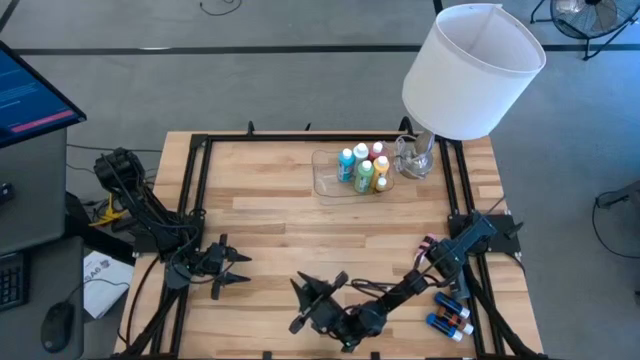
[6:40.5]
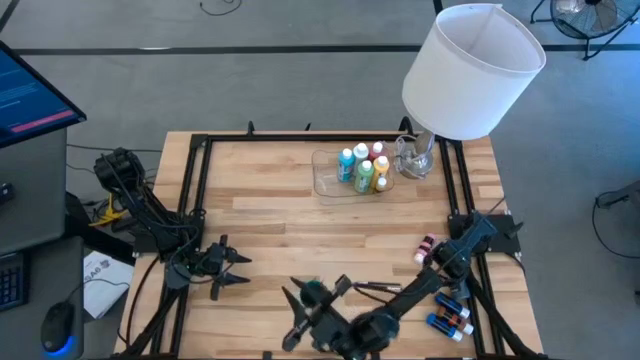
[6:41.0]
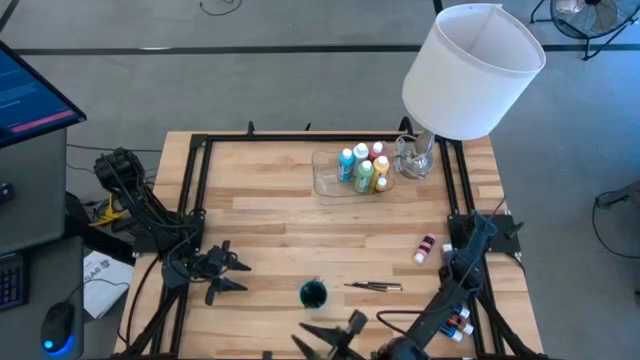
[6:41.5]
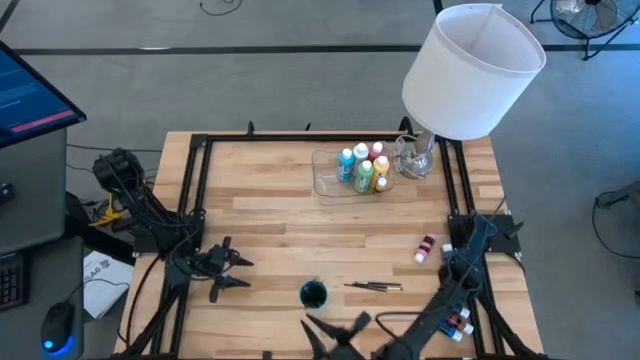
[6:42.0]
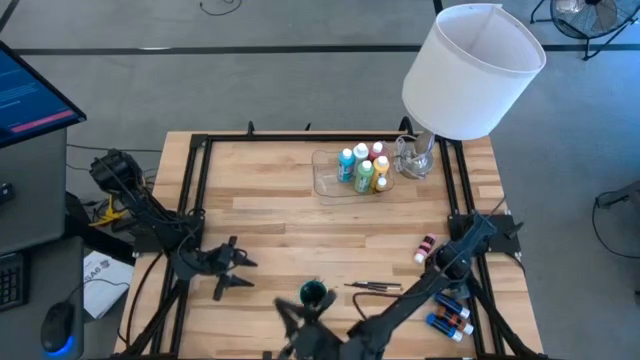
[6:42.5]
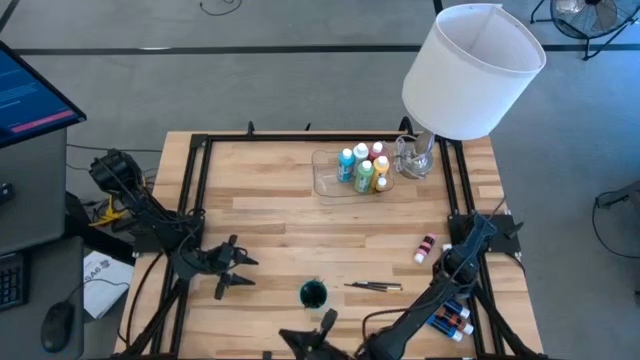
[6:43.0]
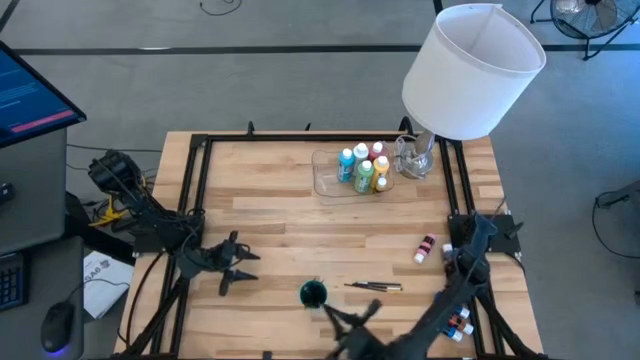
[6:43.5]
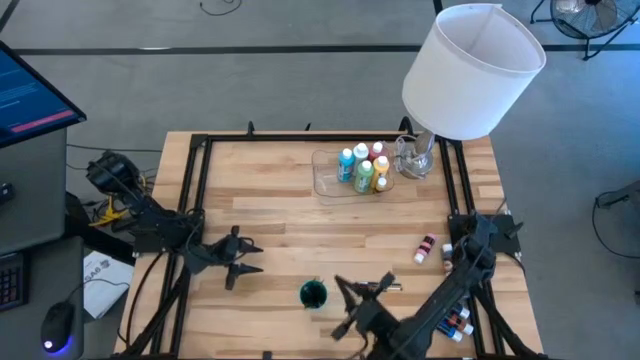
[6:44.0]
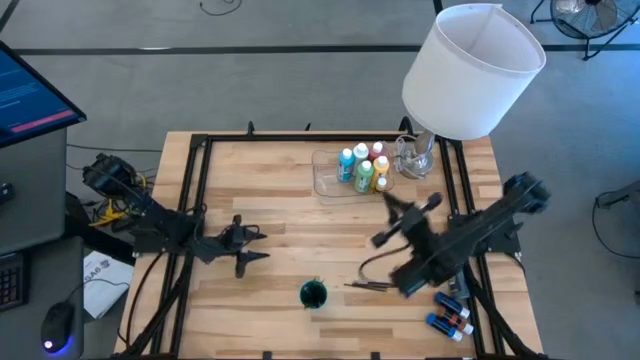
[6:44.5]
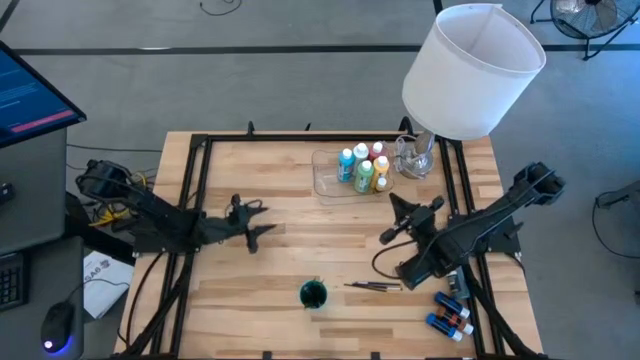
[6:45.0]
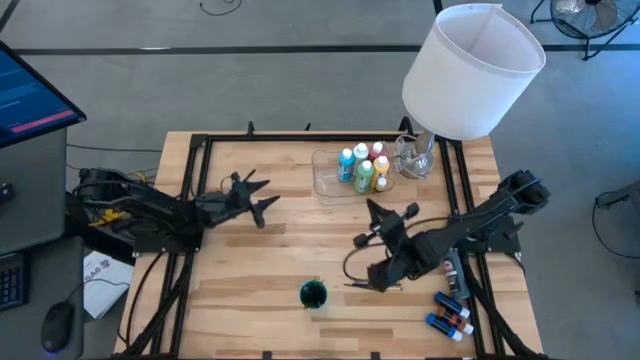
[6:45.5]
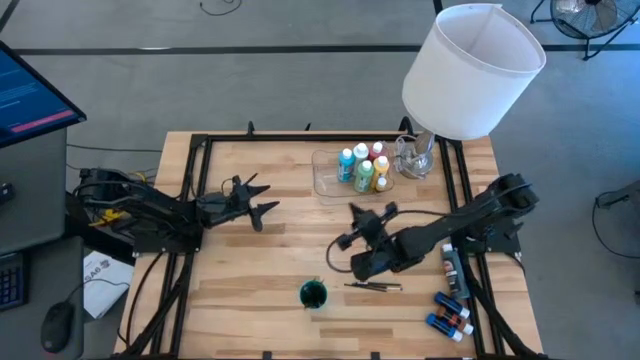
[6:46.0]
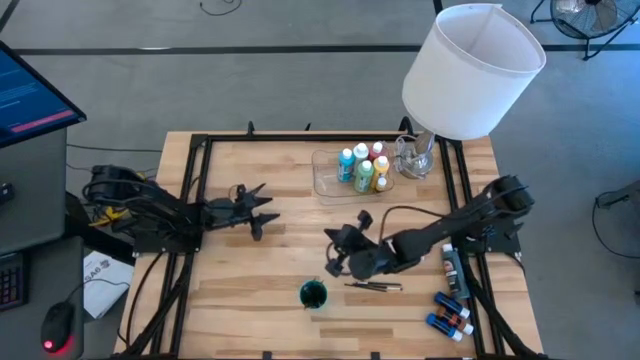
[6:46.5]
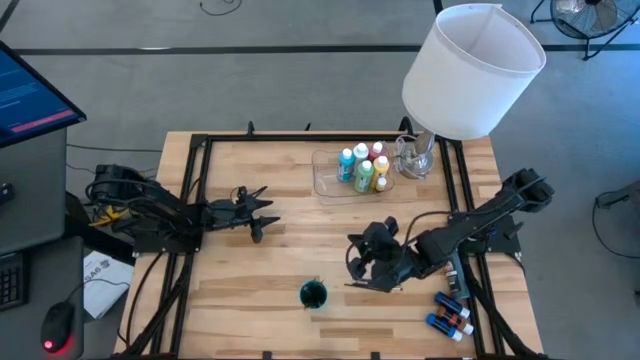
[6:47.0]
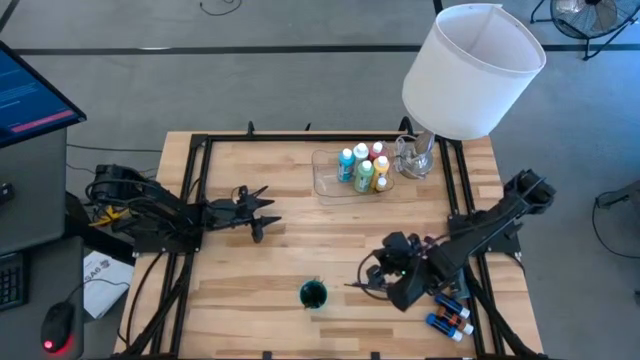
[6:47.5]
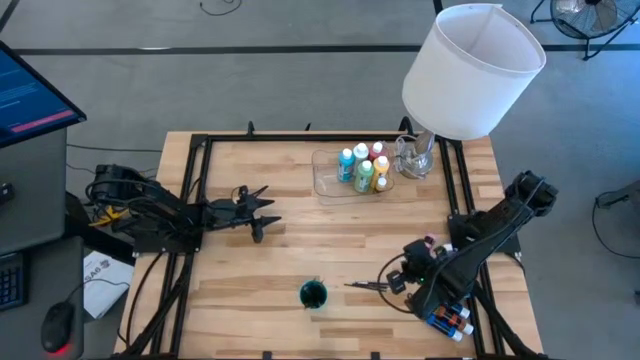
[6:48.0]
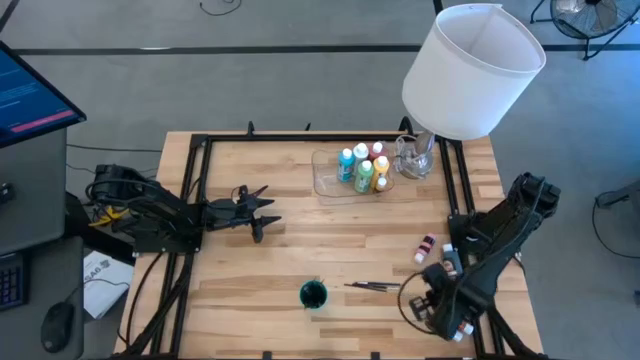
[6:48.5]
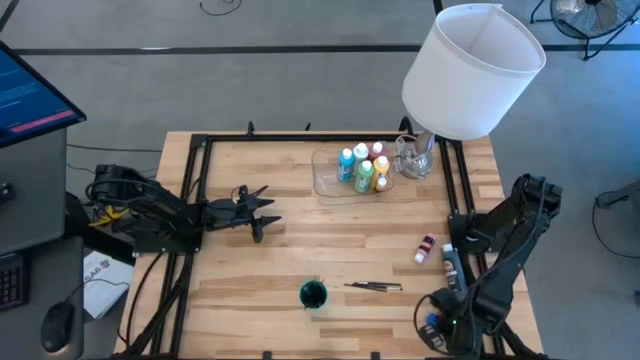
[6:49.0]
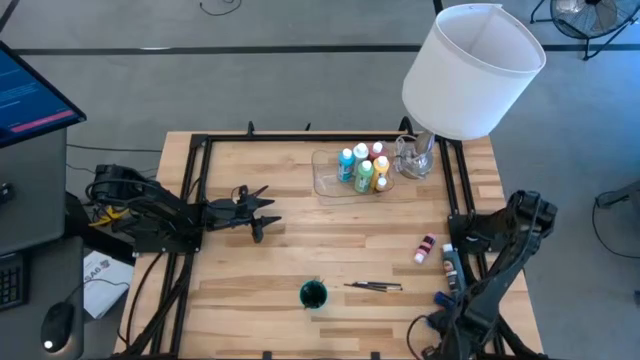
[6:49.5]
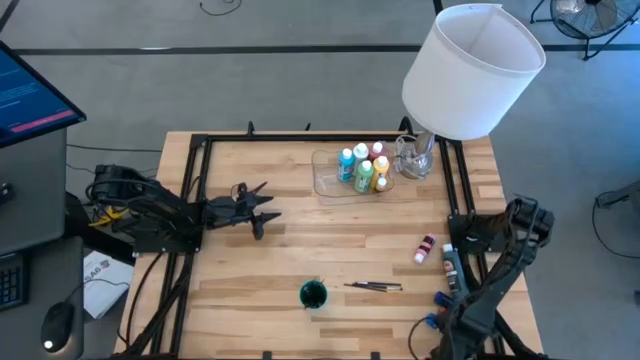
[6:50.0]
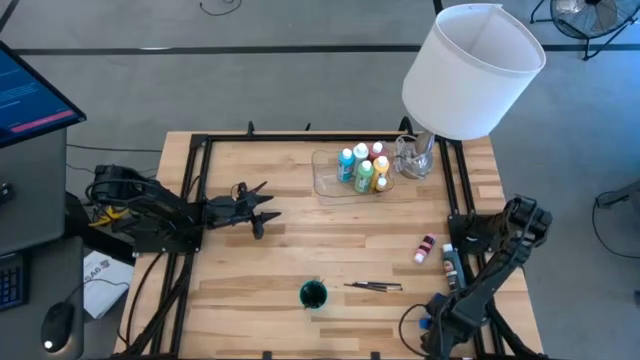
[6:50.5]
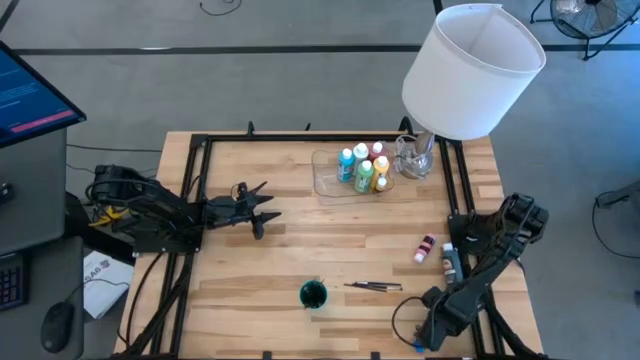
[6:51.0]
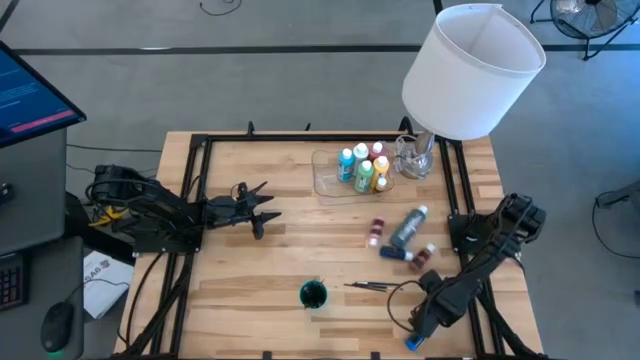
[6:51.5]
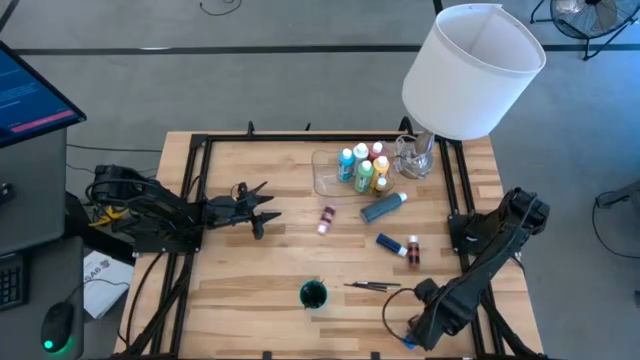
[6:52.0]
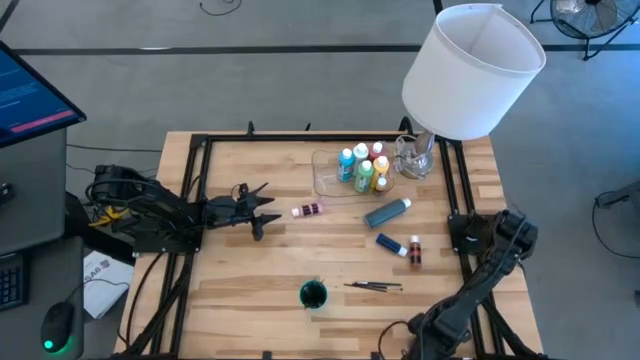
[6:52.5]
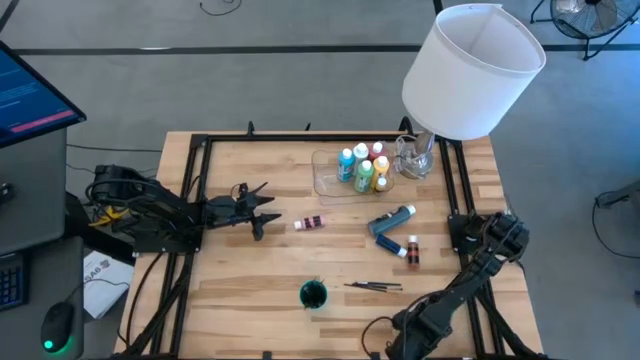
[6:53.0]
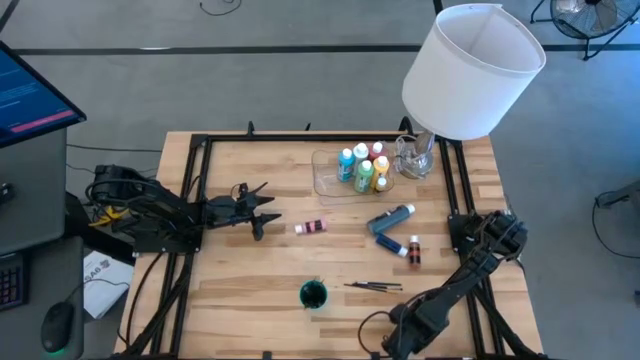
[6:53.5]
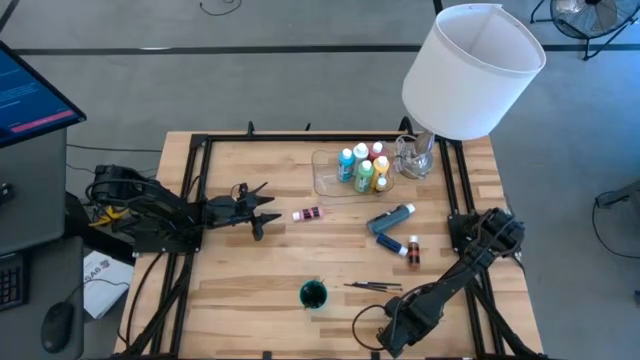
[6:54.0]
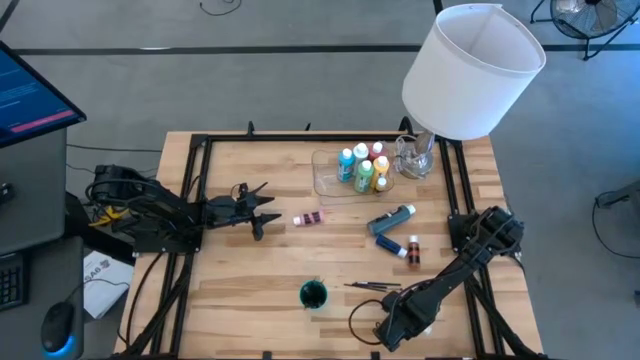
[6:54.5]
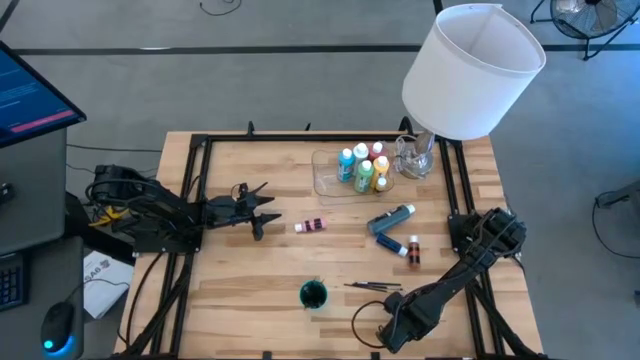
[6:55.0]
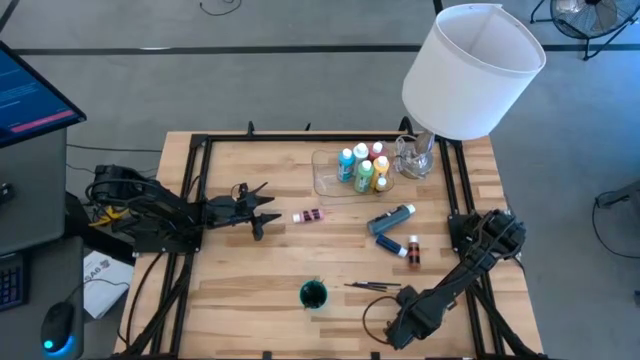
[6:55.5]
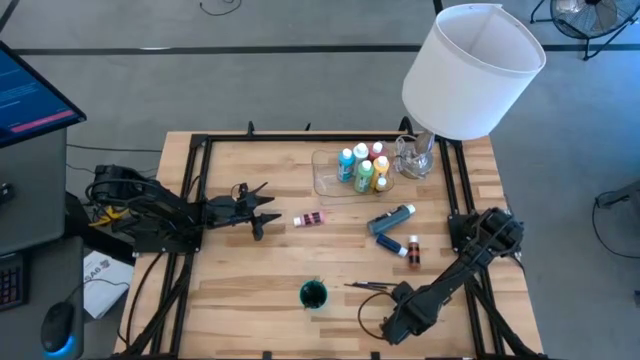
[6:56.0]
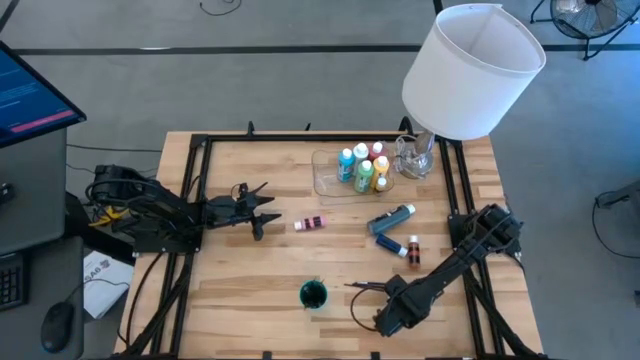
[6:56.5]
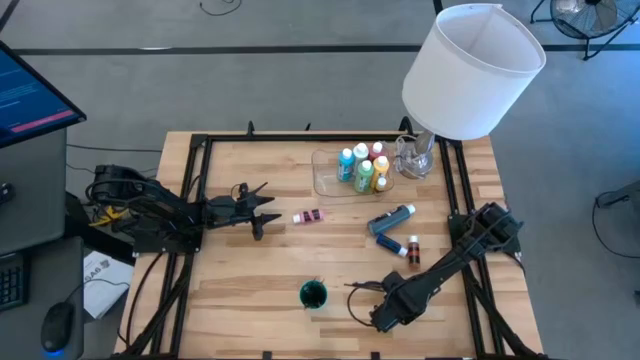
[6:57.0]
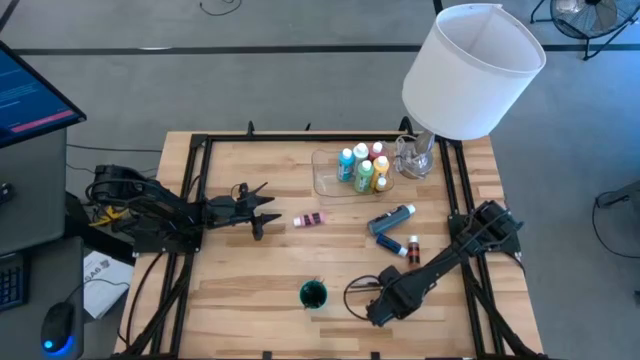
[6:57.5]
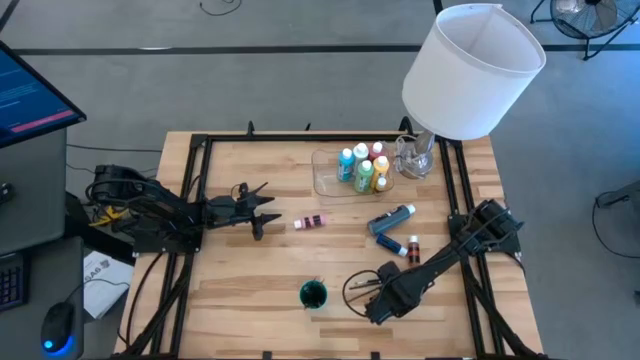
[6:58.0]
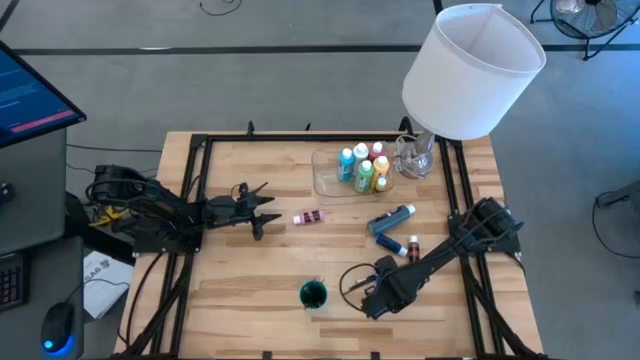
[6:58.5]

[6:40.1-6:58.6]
Task: Pick & Place Paint Supplies
Put the small orange paint bottle into the transparent bin
